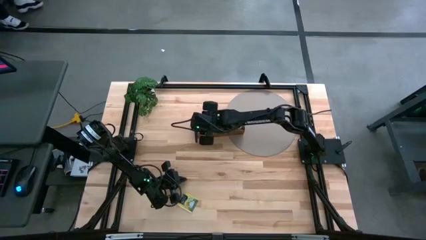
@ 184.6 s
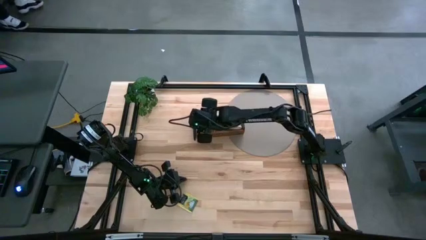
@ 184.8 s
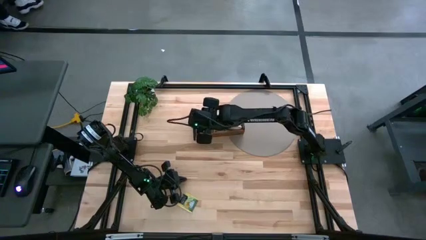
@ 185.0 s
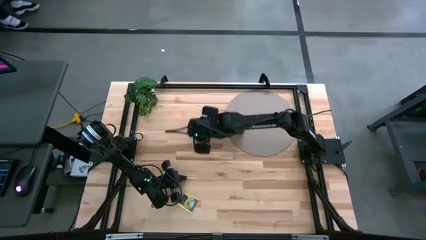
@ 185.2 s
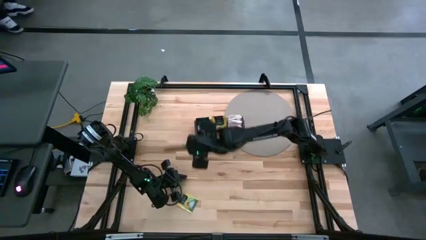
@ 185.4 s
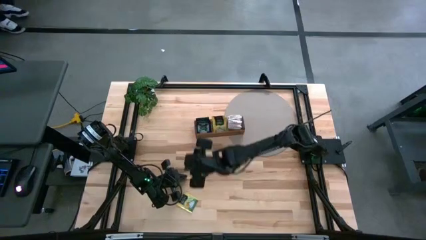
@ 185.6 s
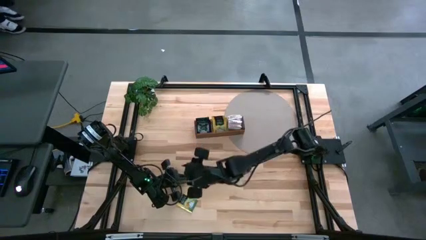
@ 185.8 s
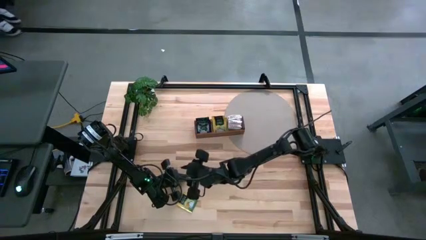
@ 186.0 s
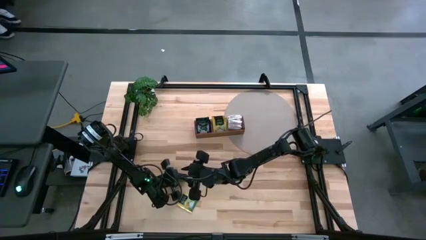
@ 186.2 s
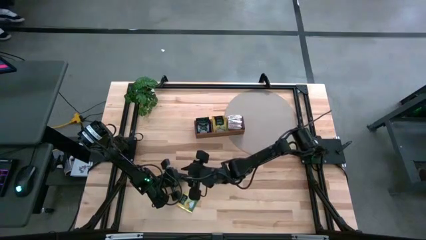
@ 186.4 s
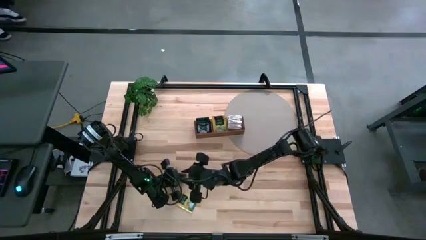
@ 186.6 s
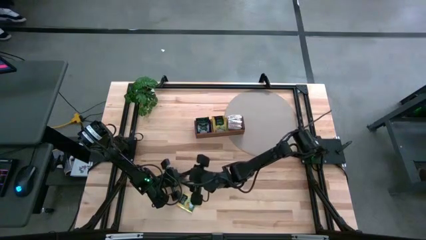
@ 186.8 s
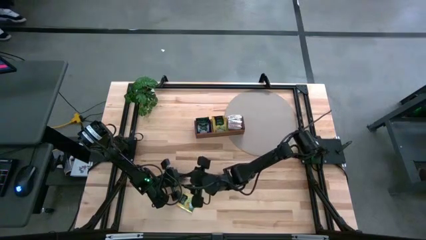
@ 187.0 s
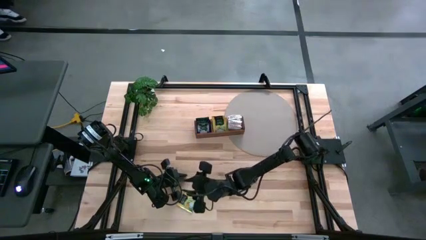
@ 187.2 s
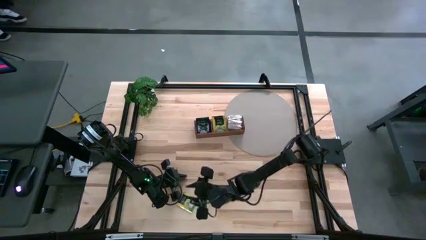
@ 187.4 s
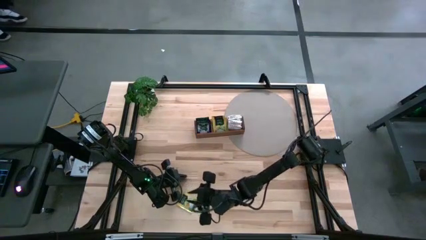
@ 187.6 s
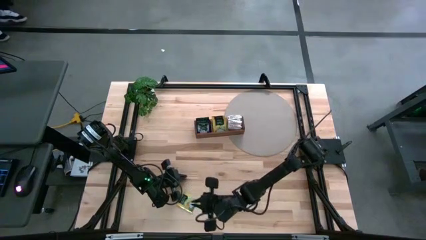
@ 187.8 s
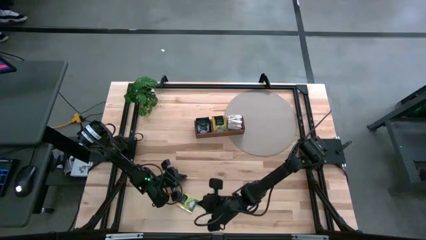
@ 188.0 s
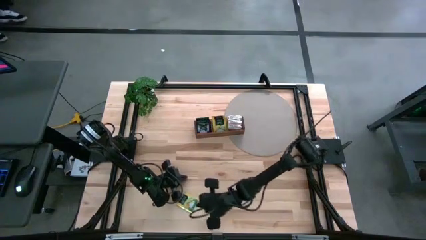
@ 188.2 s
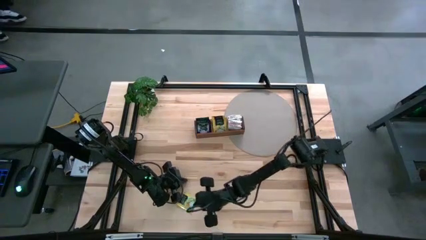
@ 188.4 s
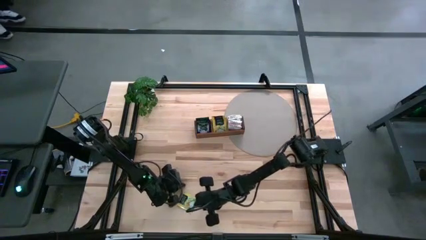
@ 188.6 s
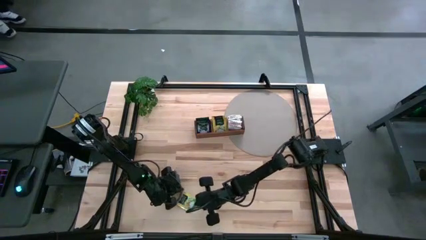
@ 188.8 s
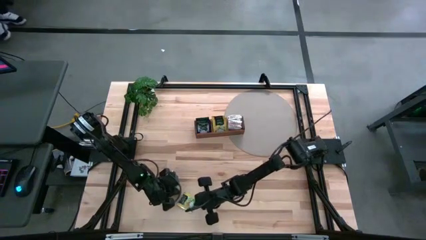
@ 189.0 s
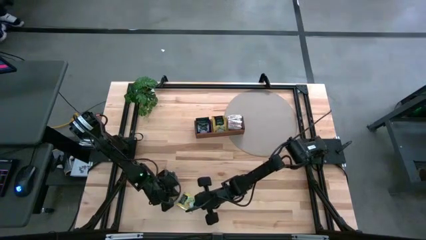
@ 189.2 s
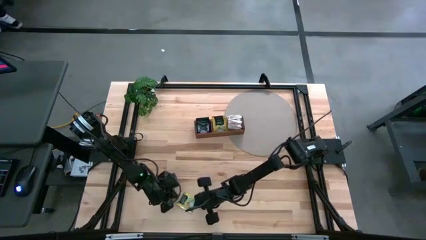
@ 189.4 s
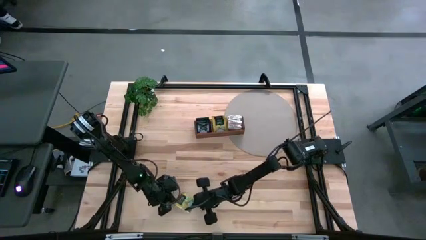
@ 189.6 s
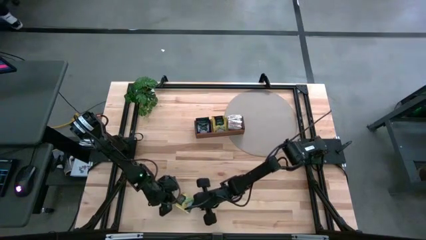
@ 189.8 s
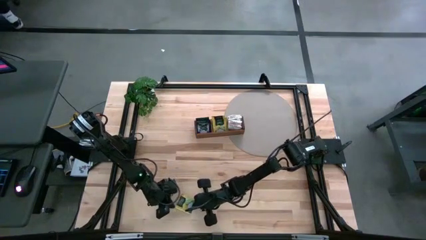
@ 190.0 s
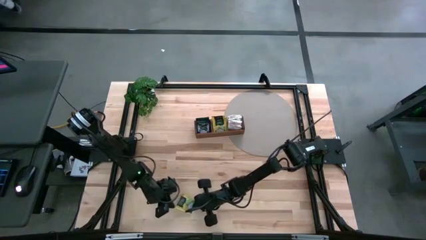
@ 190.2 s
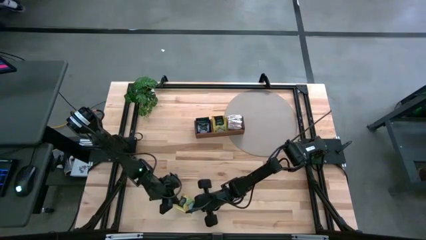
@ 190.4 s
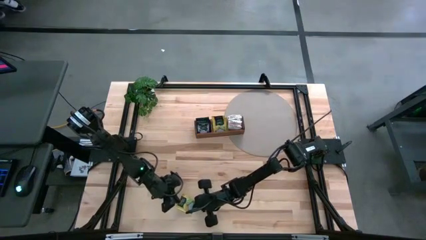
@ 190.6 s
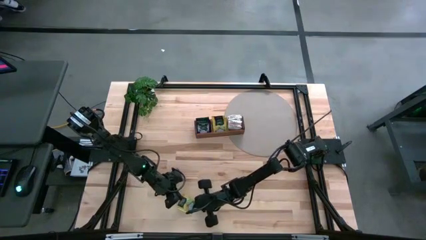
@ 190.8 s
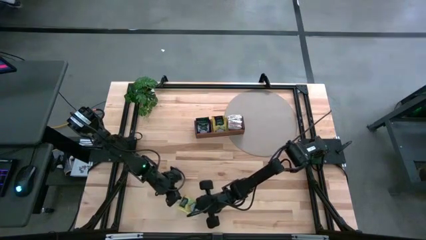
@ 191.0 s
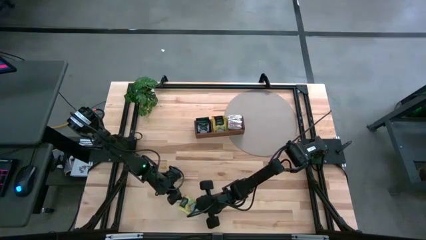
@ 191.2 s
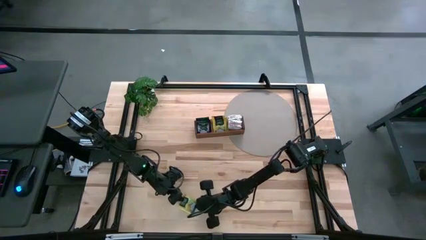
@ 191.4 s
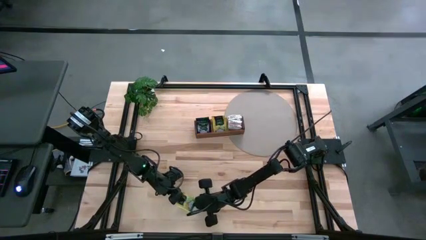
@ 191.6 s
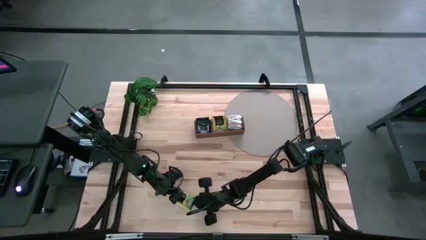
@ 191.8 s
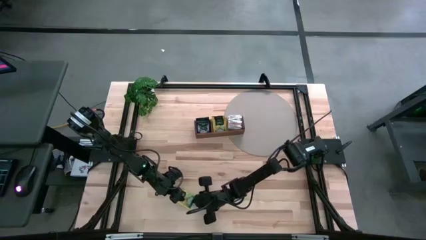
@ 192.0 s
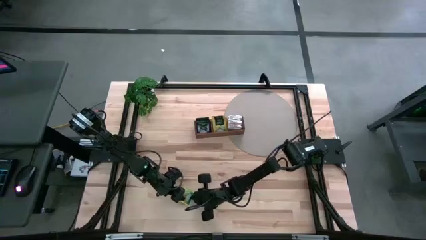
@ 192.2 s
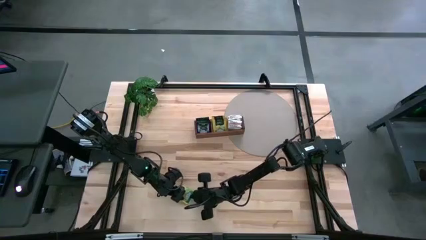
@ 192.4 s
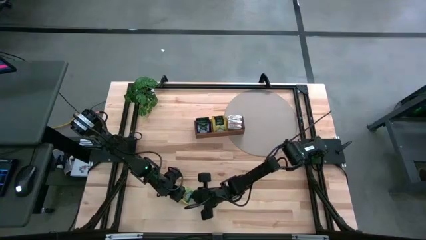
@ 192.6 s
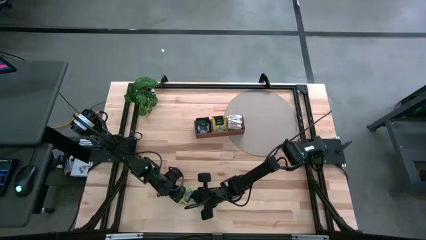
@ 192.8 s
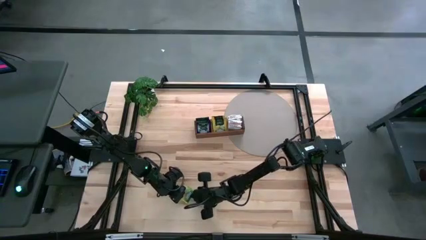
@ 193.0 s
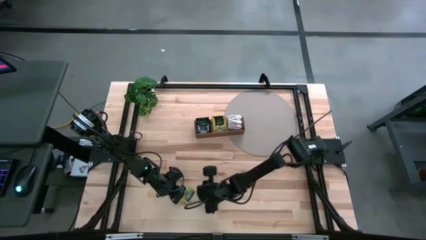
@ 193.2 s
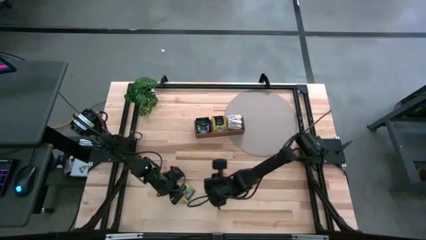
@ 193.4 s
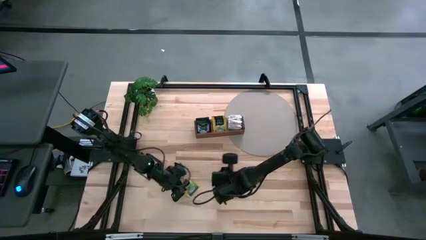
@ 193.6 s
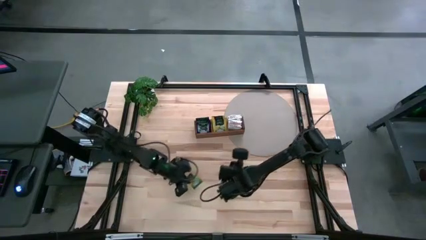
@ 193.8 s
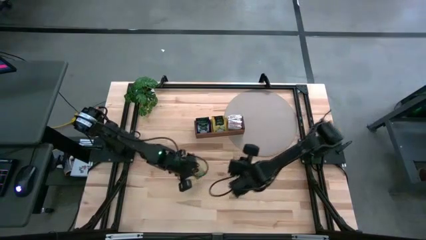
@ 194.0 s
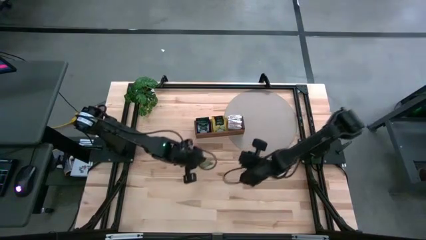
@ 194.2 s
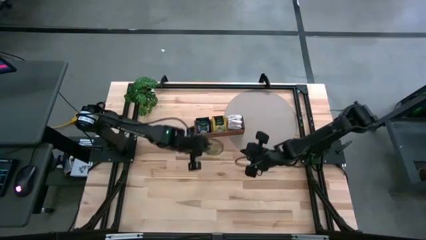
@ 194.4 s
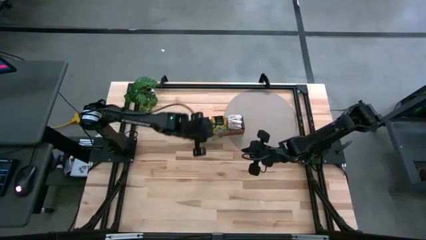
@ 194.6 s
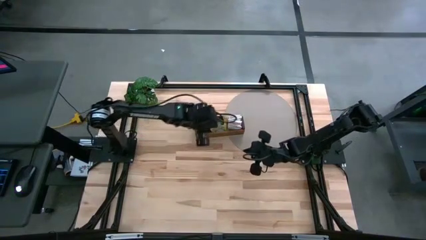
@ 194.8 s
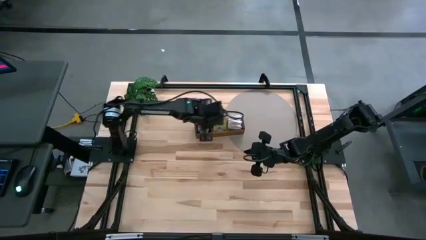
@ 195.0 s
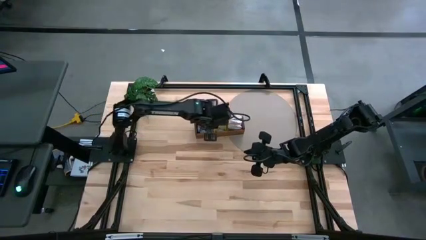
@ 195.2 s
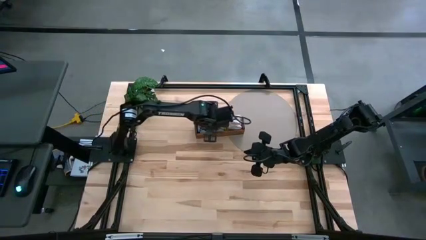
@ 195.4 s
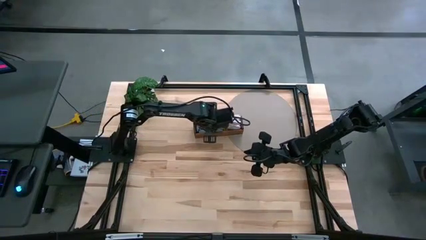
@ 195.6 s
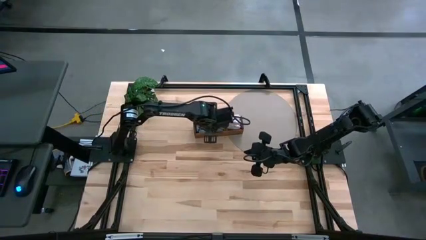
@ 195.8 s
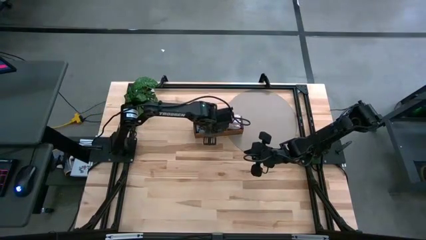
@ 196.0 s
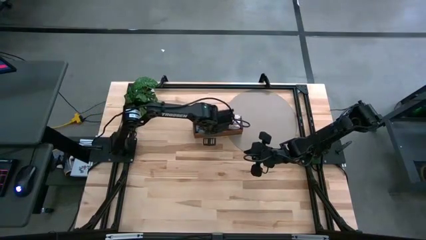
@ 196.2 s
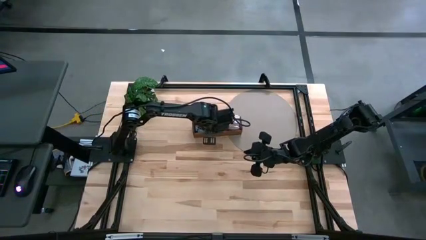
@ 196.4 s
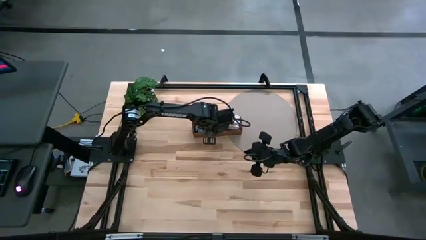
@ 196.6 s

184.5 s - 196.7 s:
Task: Pick & Place Tea
Put the yellow tea bag into the middle section of the wooden organizer

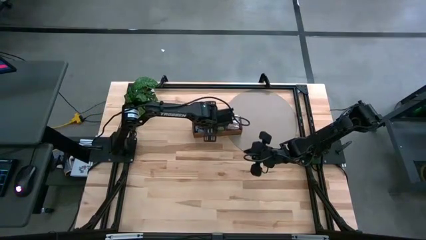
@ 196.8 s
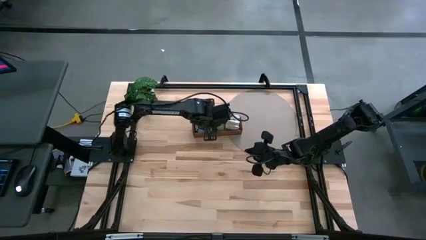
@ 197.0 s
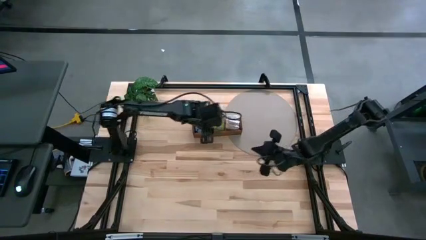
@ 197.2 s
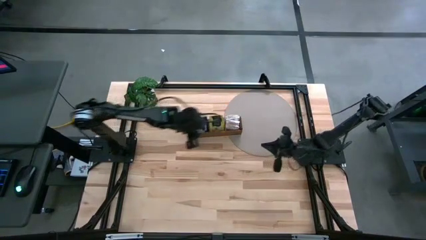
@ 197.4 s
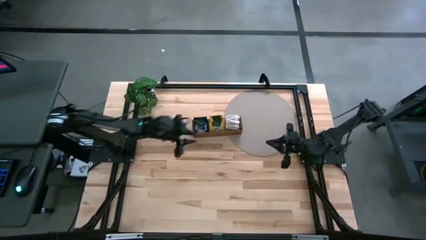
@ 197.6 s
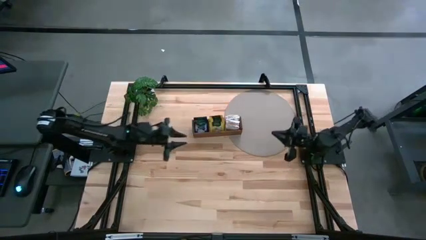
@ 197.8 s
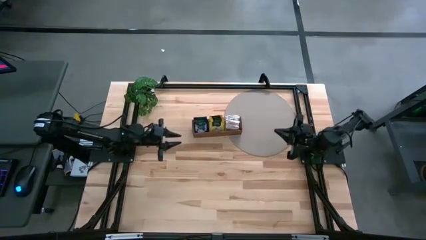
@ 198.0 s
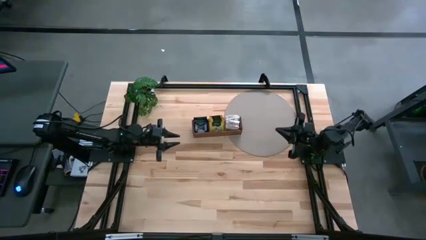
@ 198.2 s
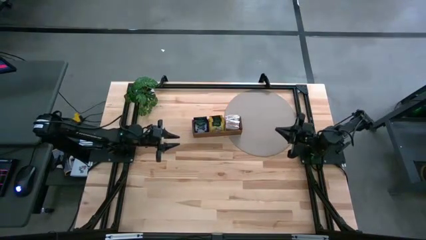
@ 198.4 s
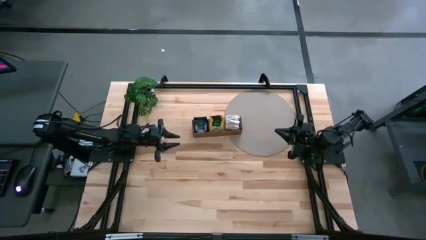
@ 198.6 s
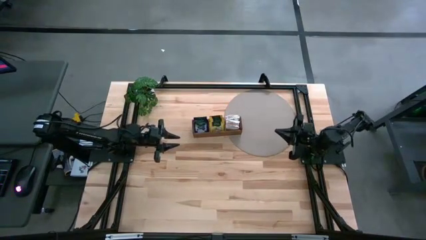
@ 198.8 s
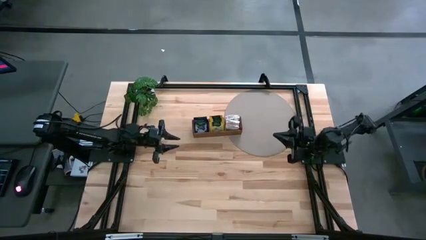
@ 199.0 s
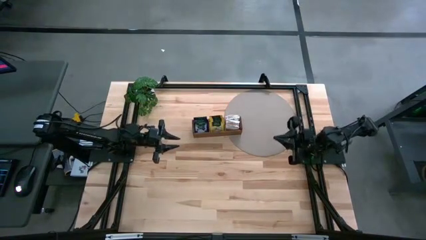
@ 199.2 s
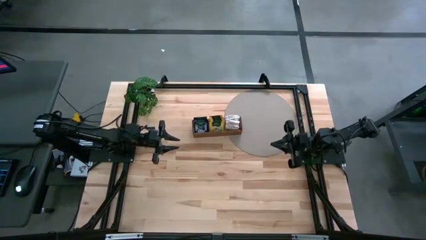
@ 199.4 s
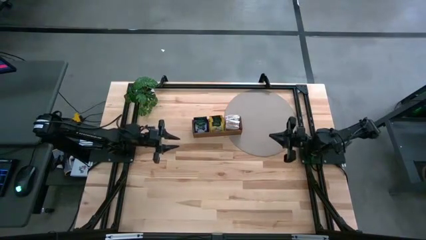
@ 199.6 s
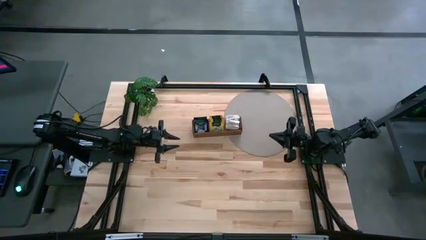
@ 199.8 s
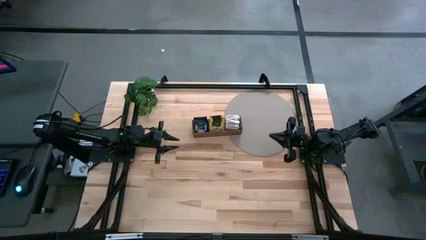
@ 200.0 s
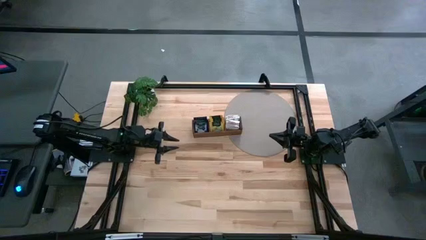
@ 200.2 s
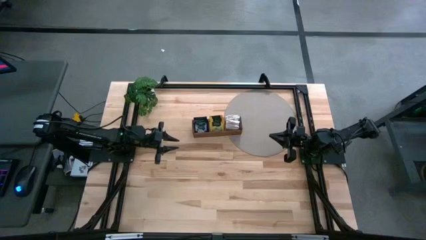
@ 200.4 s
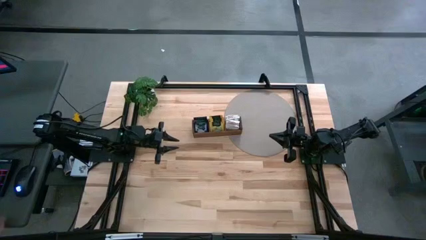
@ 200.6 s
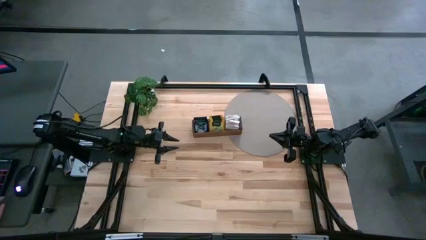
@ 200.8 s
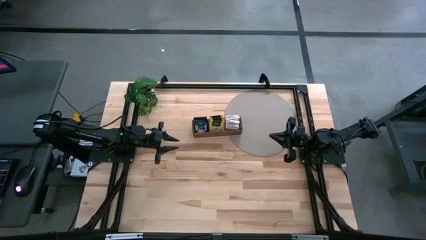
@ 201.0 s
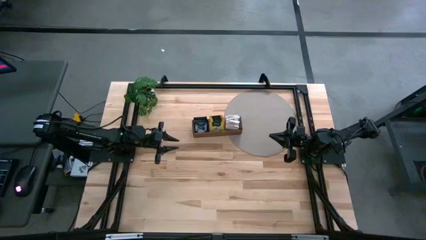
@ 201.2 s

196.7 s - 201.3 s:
Return to Home Position
